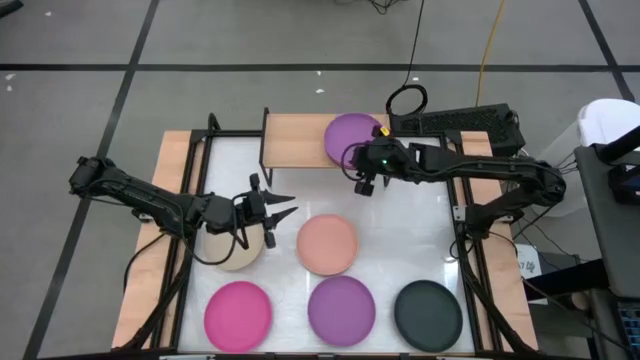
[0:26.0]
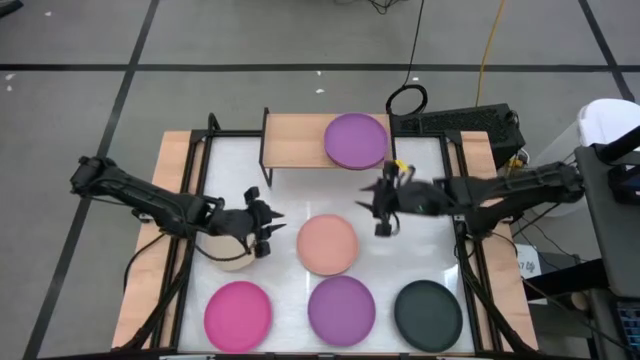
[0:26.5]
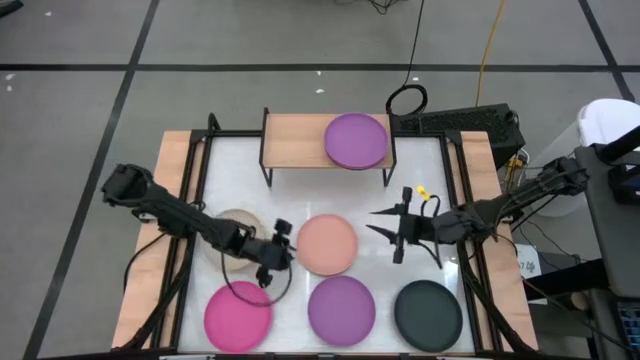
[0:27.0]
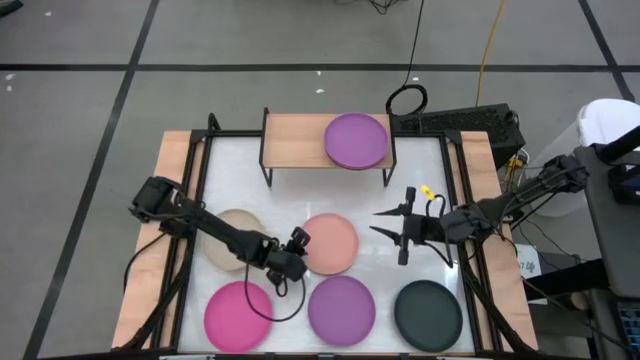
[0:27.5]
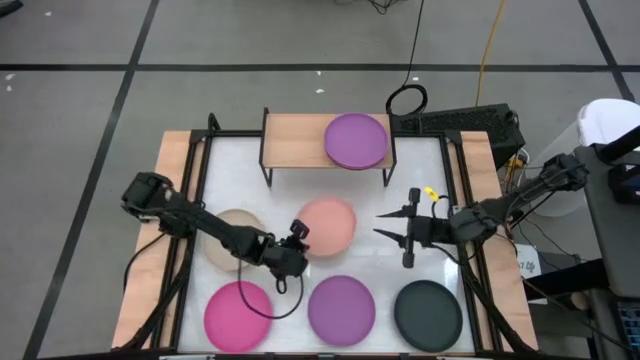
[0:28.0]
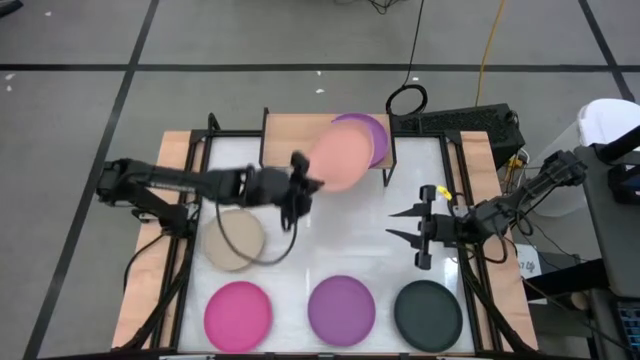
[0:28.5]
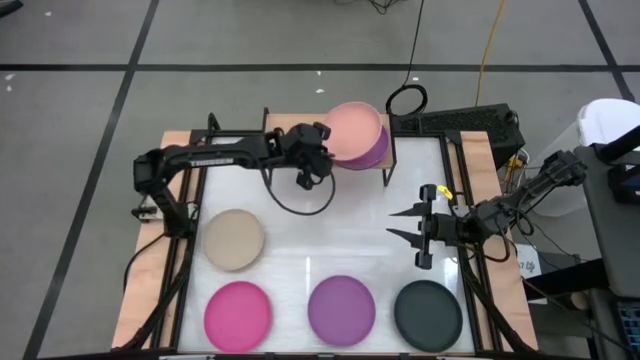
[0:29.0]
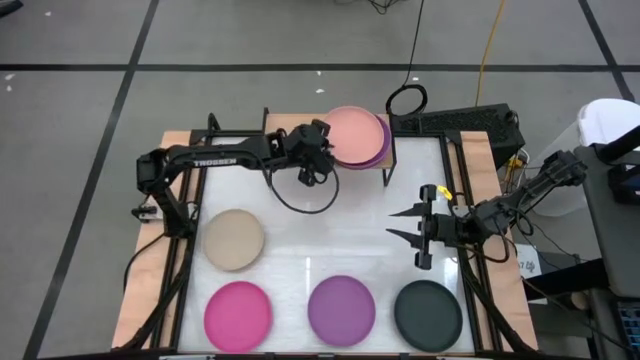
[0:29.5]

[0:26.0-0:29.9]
Task: Place and stack plates onto a shelf
Stack the light orange plate on top of the violet plate on the shelf

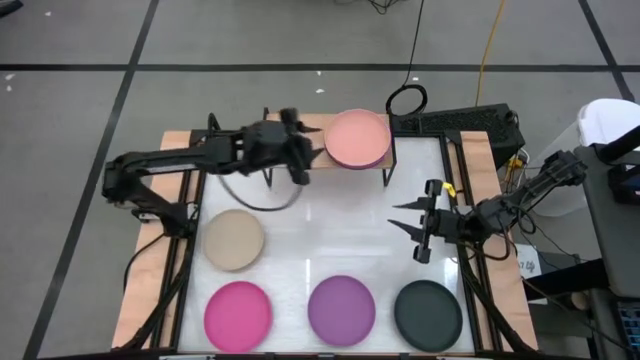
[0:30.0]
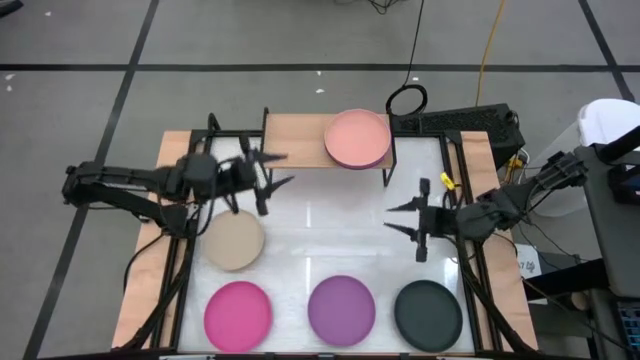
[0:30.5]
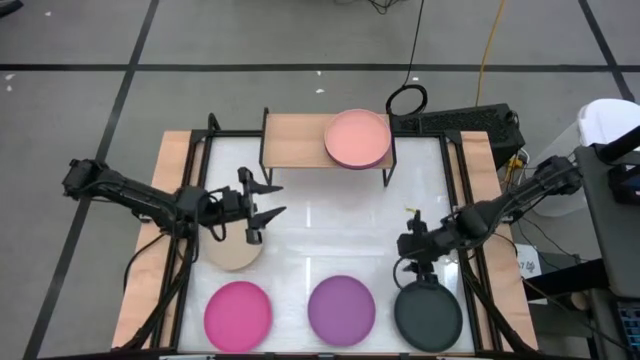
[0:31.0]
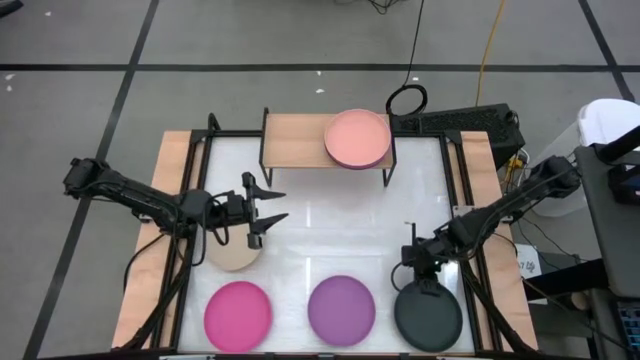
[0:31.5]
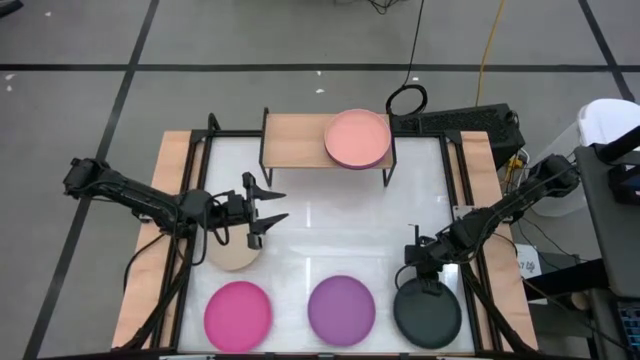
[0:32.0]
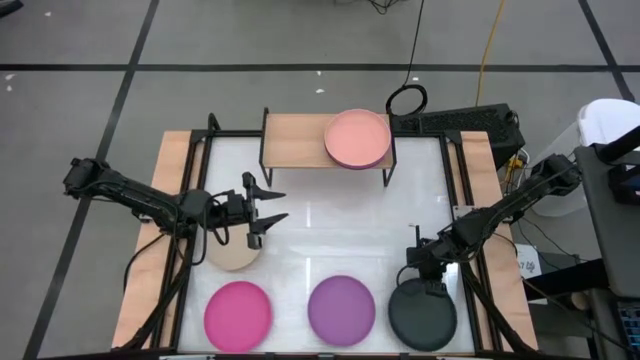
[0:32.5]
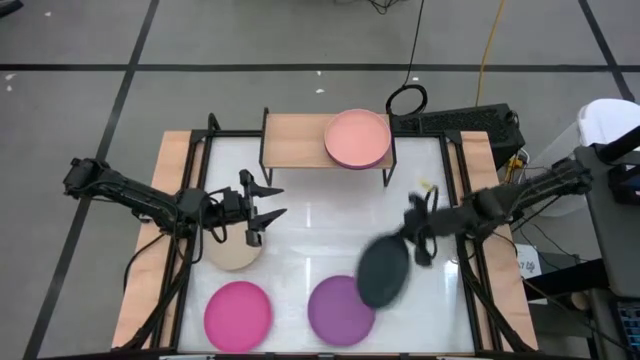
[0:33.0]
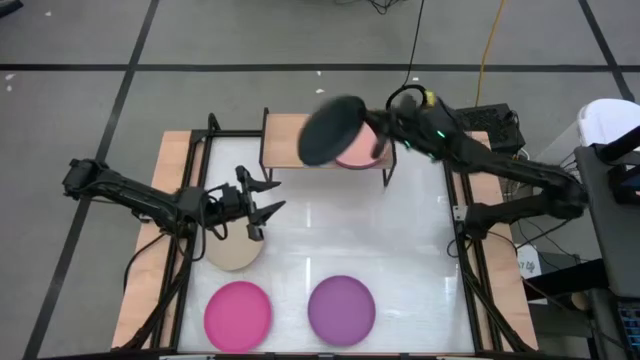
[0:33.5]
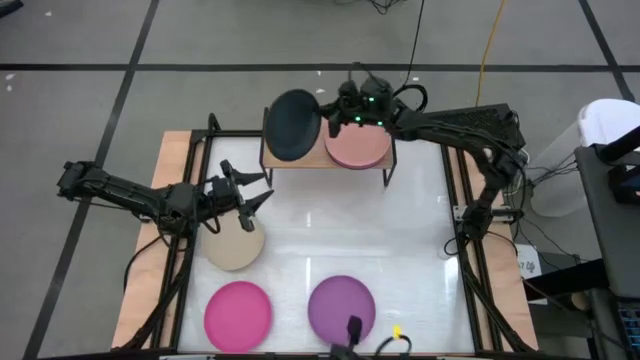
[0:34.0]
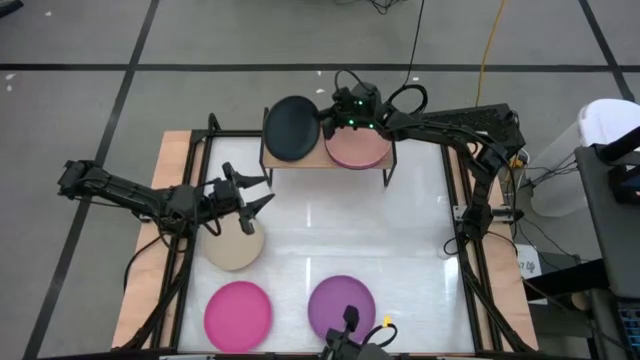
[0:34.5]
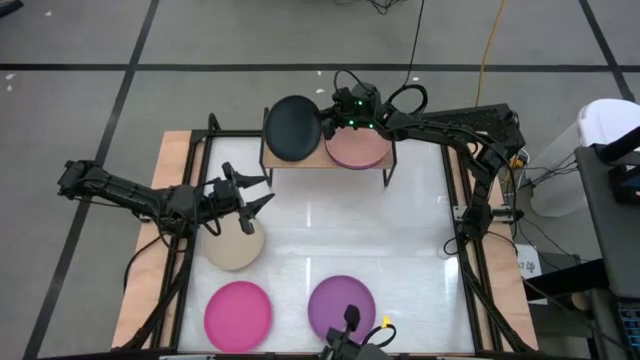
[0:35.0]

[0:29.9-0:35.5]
Put the black plate on the shelf

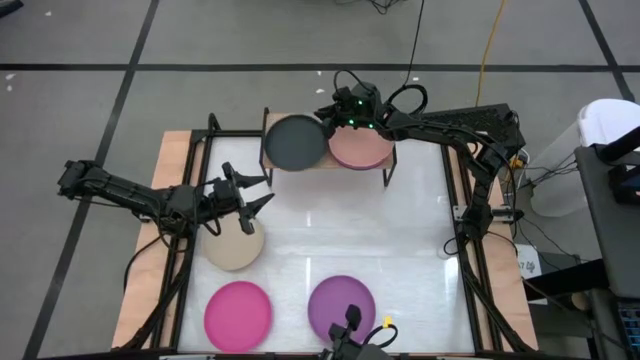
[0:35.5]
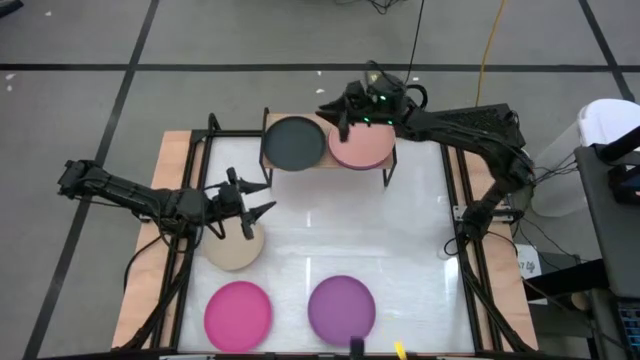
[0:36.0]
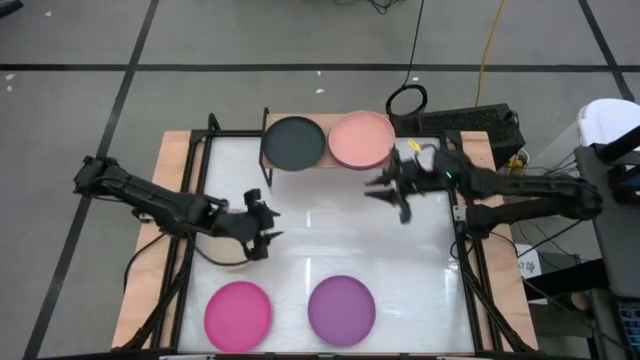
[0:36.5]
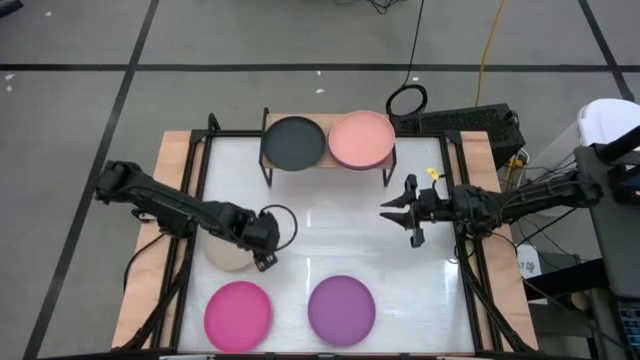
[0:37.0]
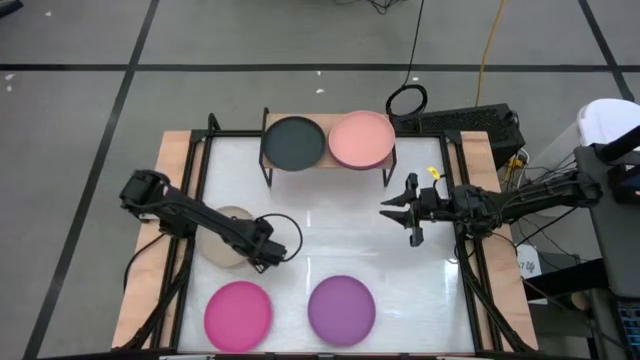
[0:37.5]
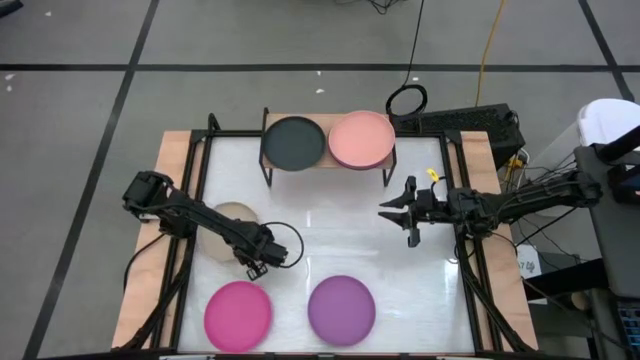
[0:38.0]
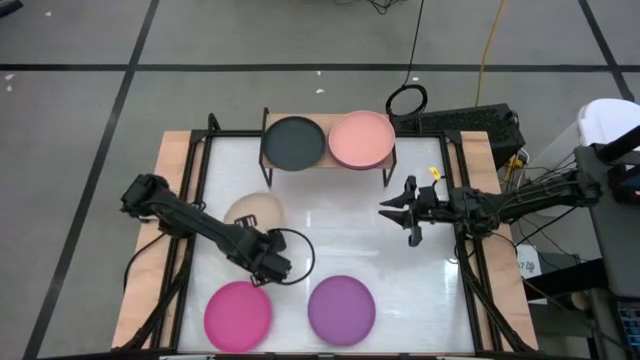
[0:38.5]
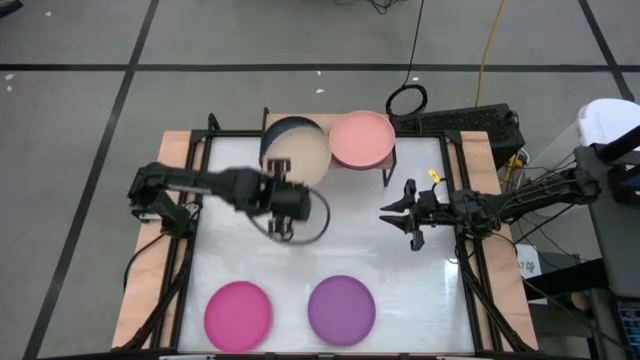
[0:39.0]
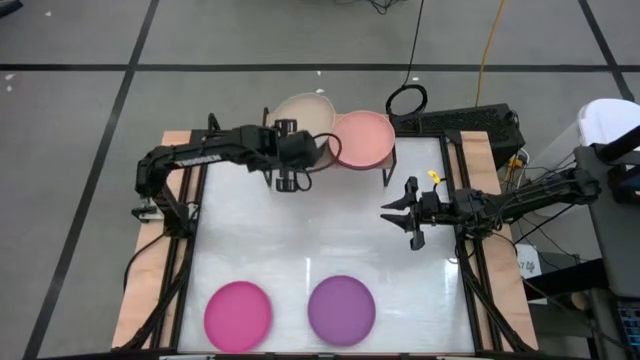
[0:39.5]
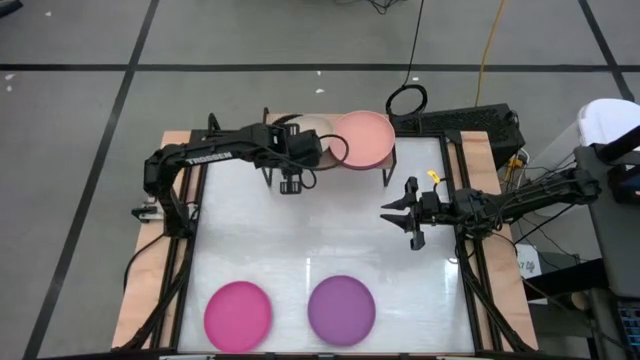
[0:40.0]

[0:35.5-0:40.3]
Stack the light brown plate on top of the black plate on the shelf

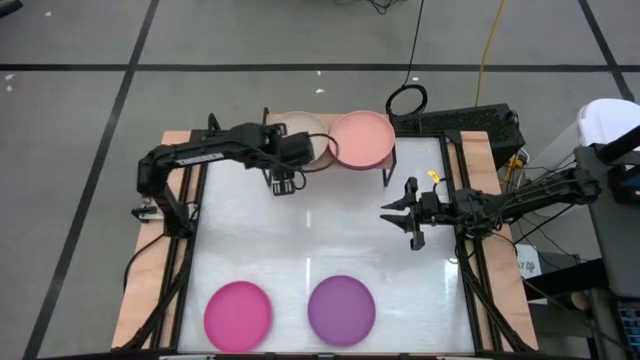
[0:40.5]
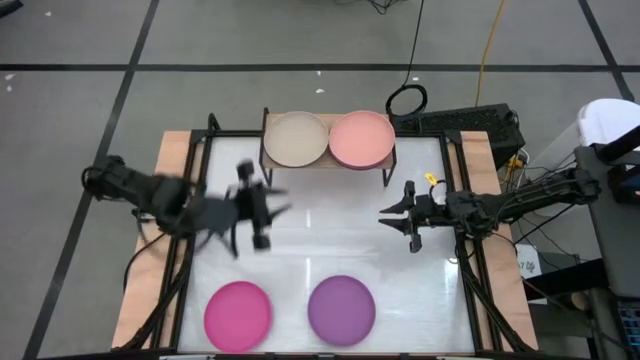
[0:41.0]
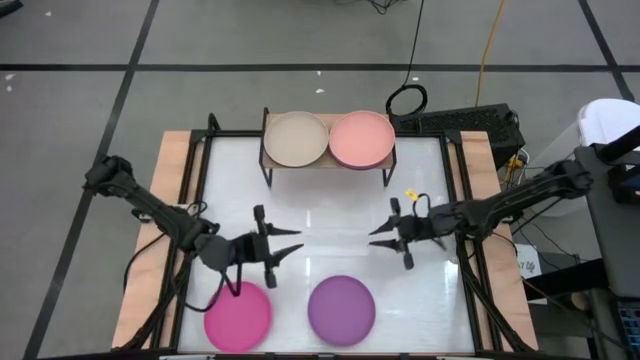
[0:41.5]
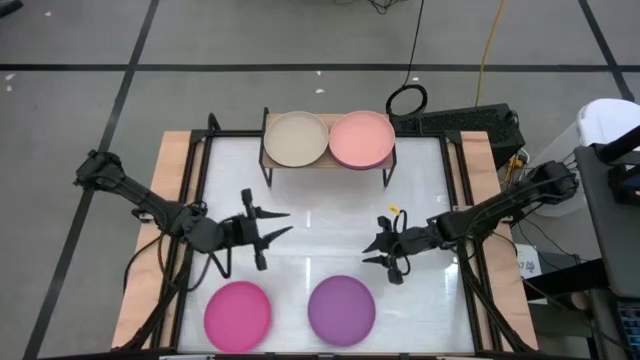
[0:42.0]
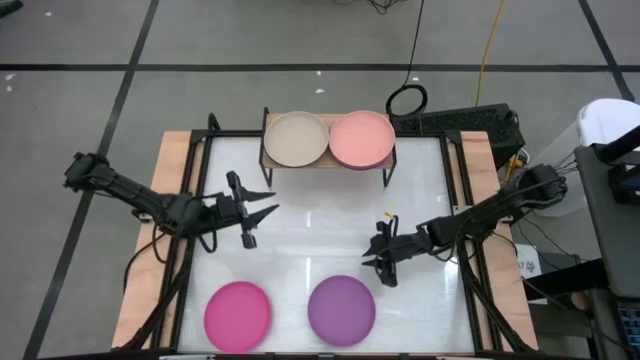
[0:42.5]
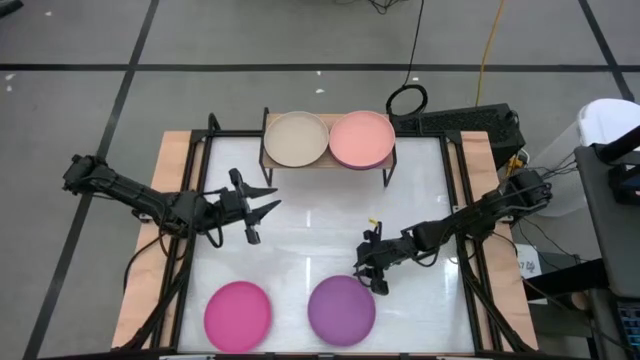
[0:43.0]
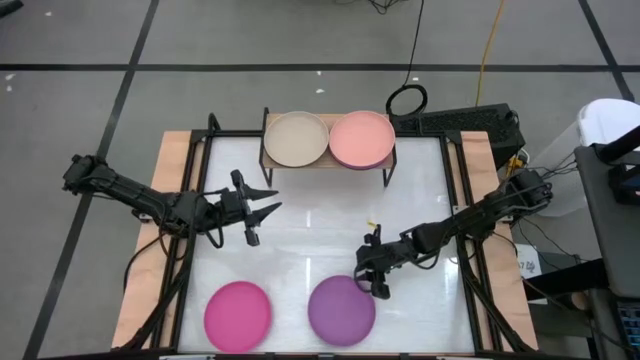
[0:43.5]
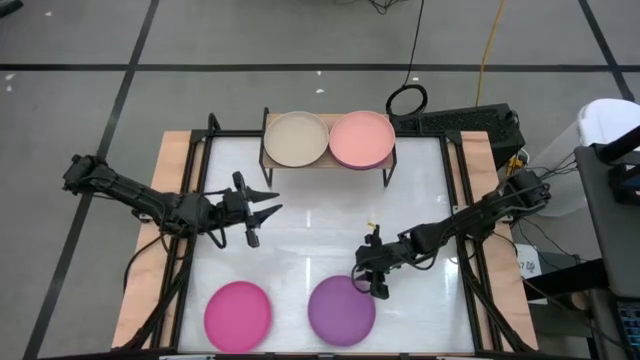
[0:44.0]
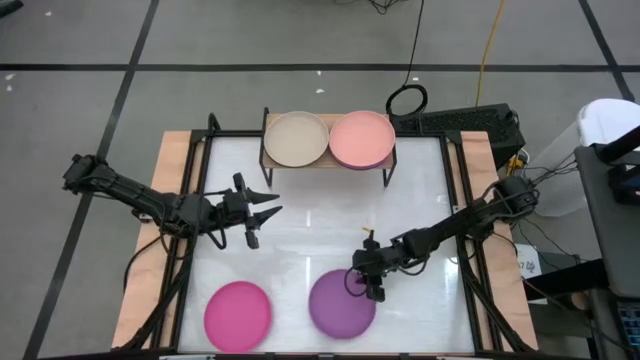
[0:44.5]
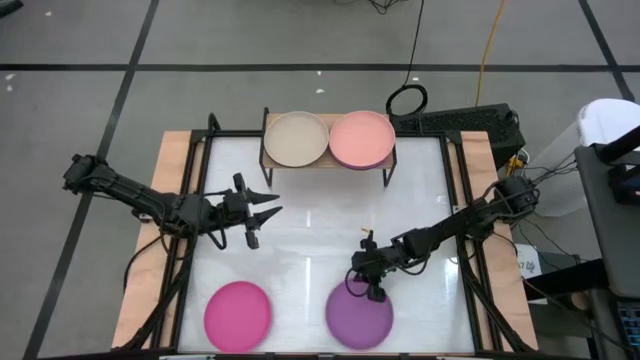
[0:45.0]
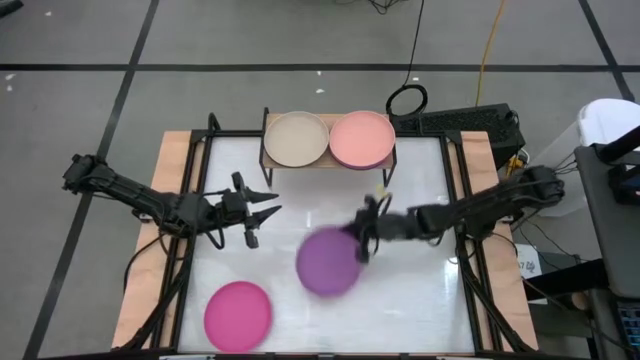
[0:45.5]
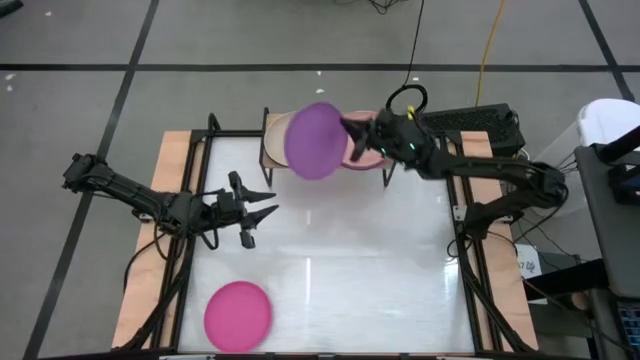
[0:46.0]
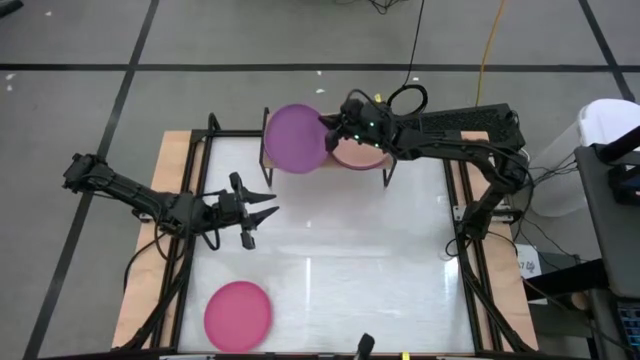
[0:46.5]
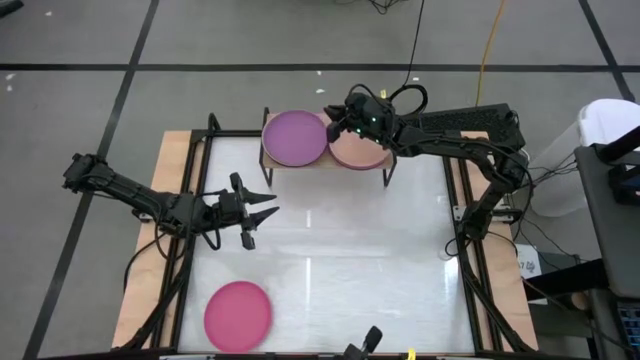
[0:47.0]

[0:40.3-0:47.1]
Stack the violet plate on top of the light brown plate on the shelf
